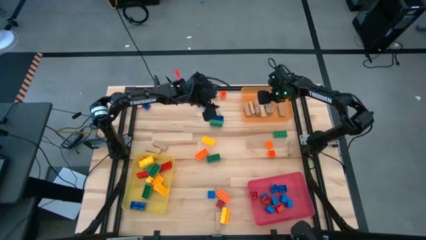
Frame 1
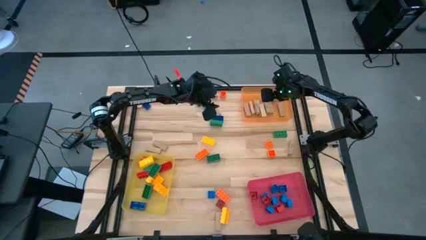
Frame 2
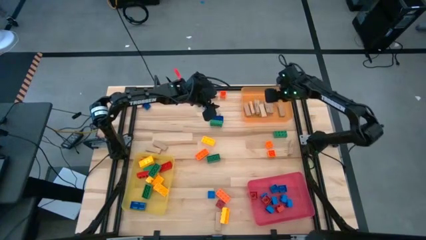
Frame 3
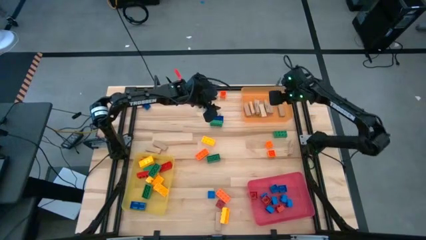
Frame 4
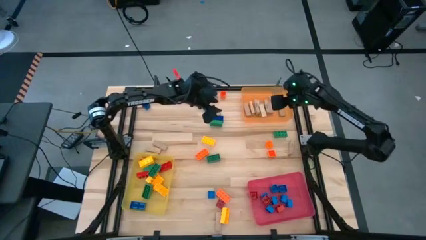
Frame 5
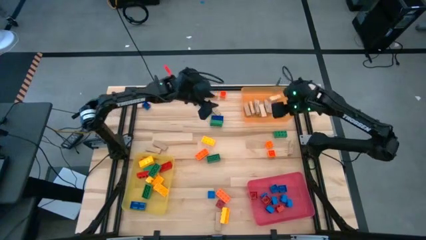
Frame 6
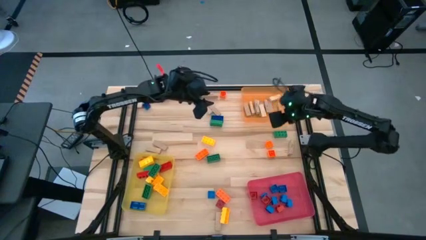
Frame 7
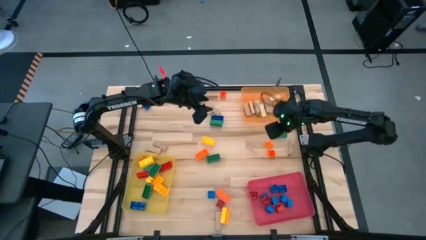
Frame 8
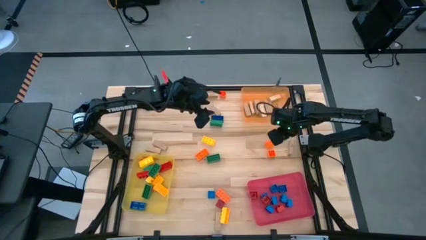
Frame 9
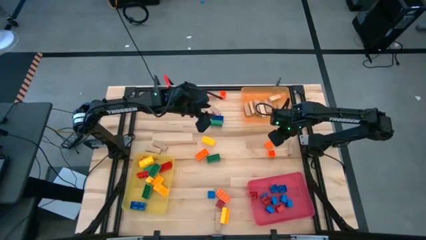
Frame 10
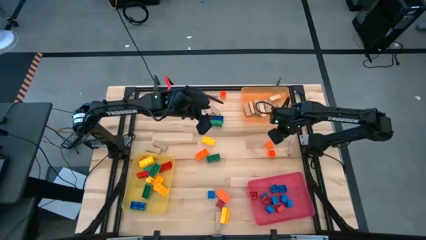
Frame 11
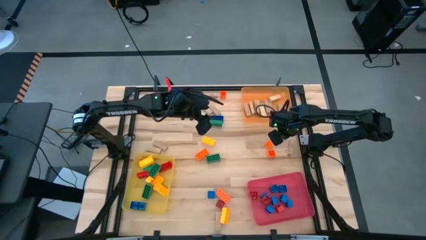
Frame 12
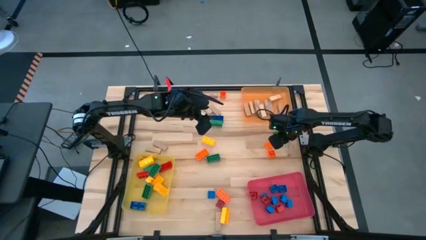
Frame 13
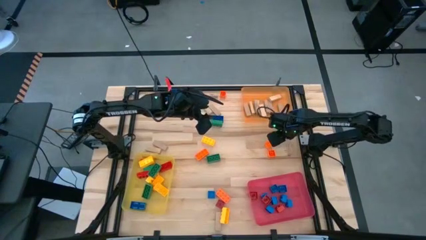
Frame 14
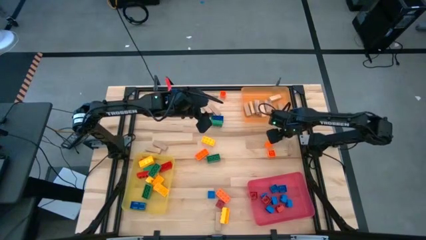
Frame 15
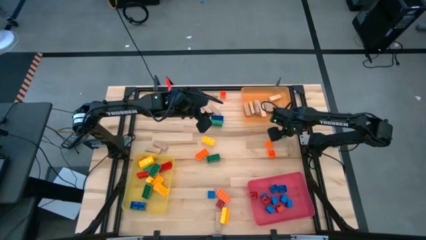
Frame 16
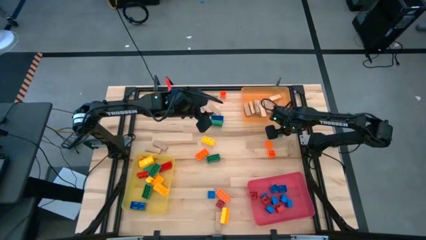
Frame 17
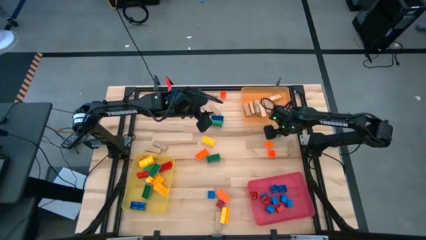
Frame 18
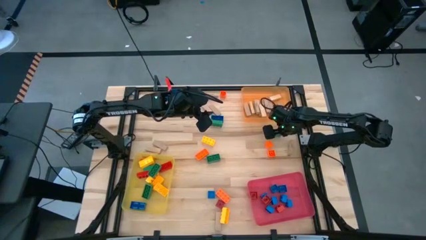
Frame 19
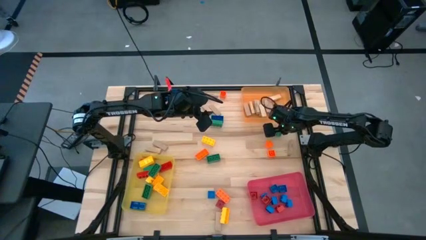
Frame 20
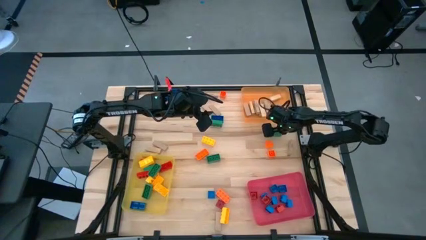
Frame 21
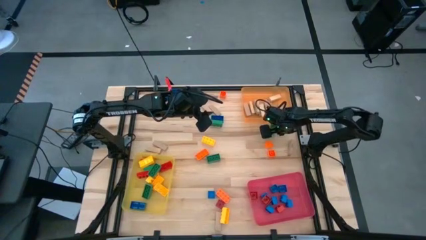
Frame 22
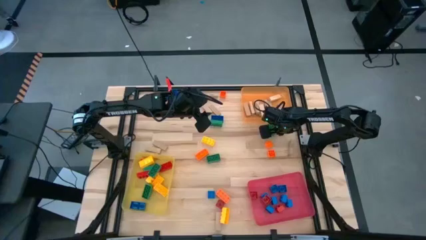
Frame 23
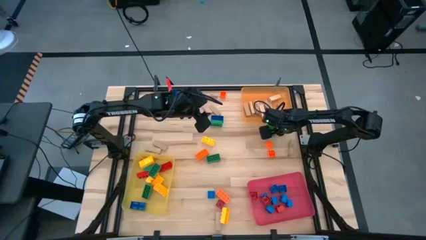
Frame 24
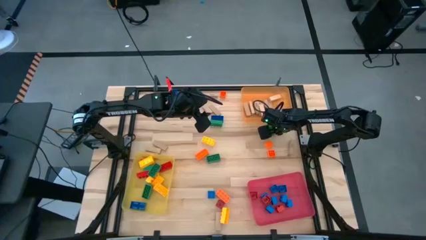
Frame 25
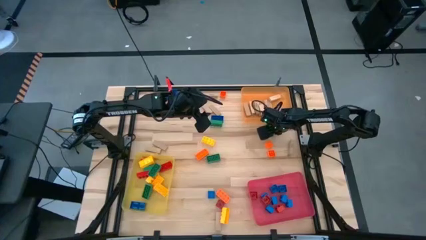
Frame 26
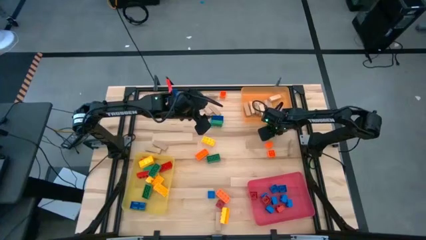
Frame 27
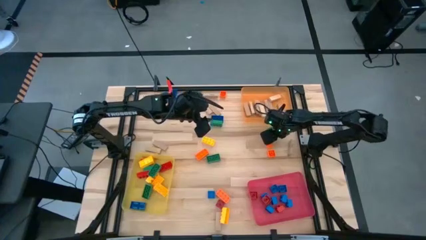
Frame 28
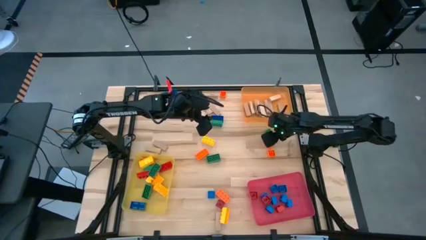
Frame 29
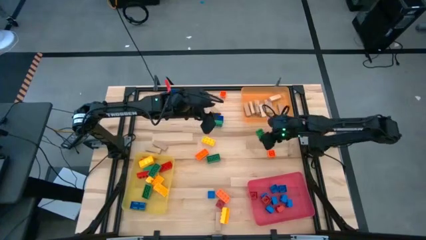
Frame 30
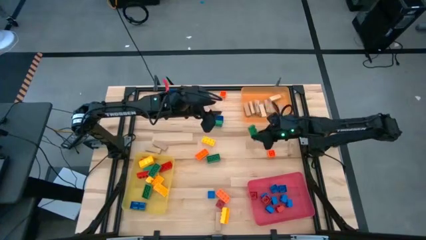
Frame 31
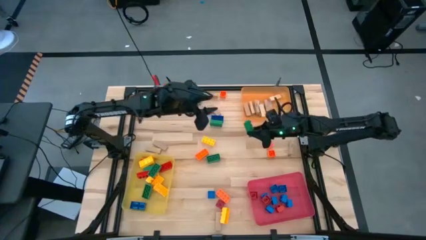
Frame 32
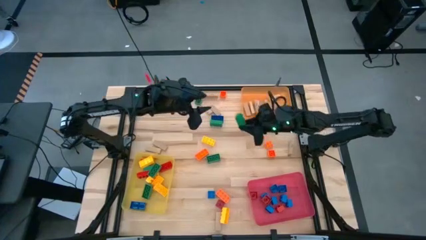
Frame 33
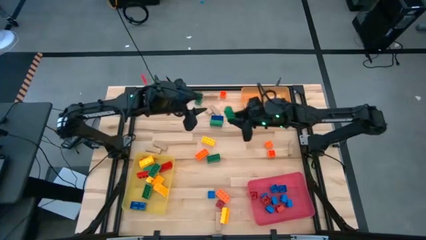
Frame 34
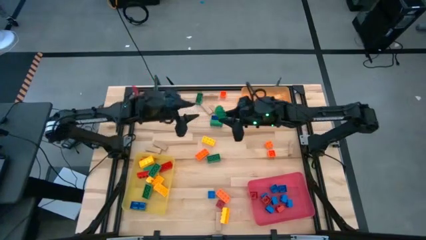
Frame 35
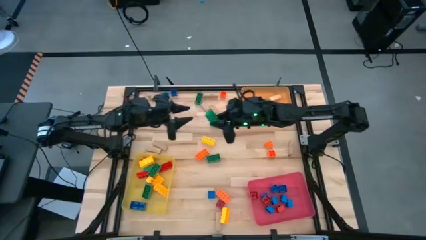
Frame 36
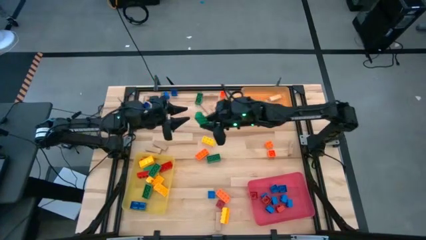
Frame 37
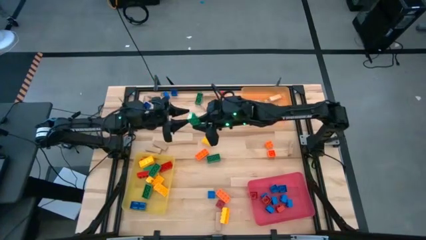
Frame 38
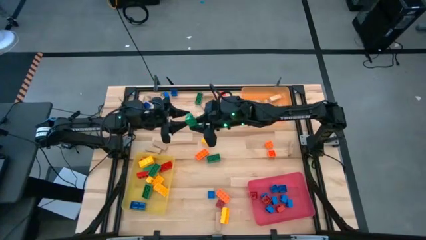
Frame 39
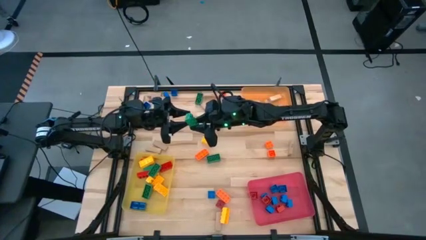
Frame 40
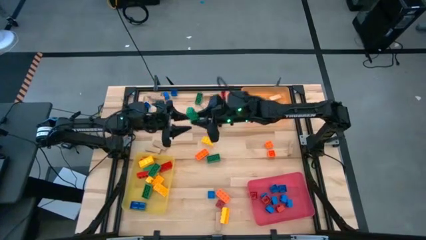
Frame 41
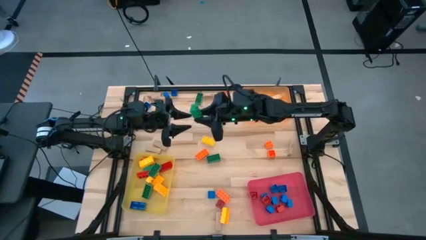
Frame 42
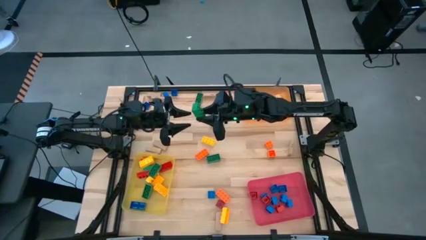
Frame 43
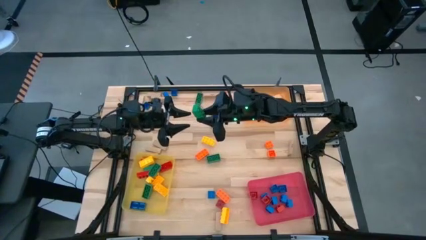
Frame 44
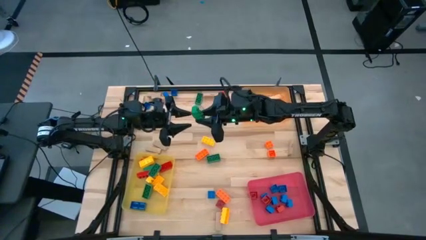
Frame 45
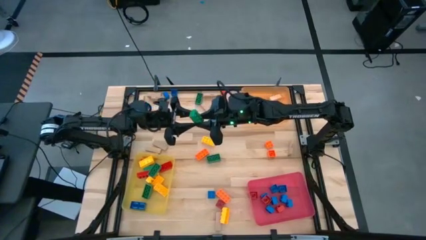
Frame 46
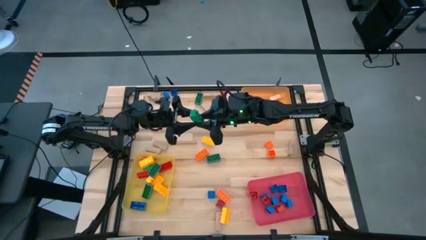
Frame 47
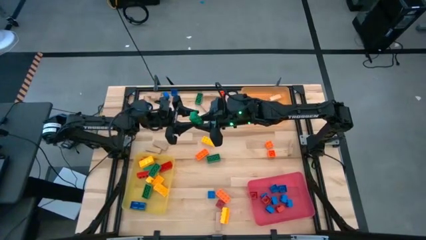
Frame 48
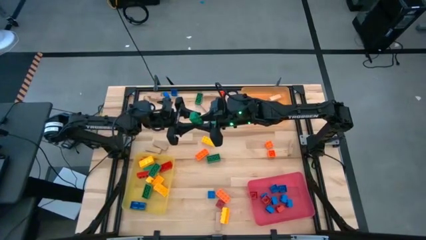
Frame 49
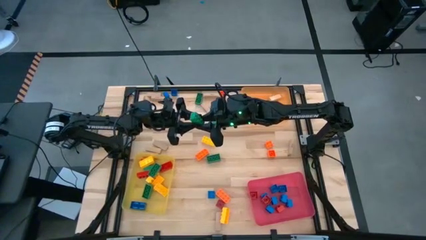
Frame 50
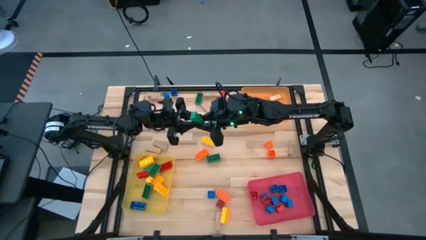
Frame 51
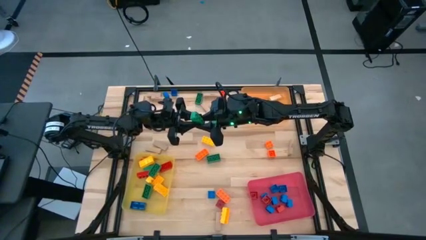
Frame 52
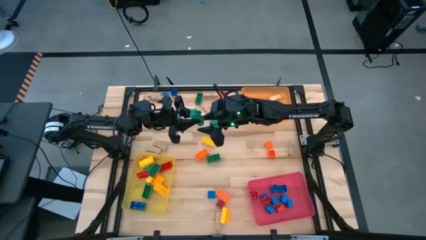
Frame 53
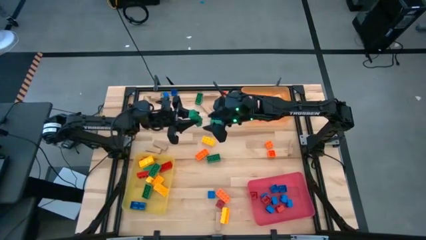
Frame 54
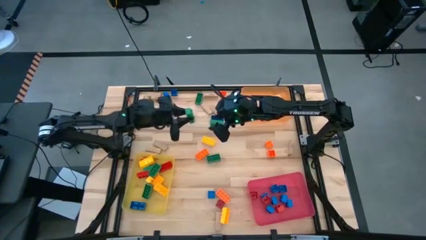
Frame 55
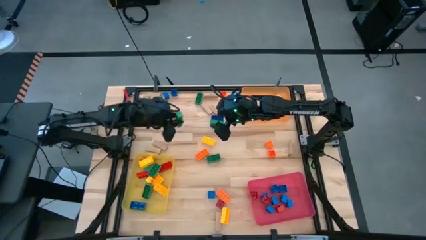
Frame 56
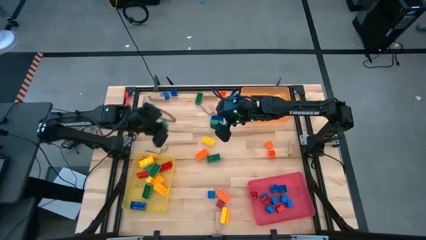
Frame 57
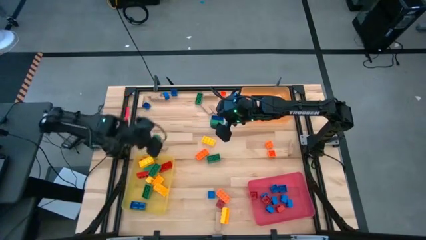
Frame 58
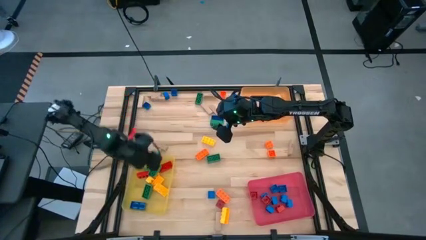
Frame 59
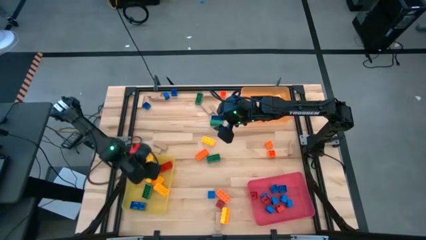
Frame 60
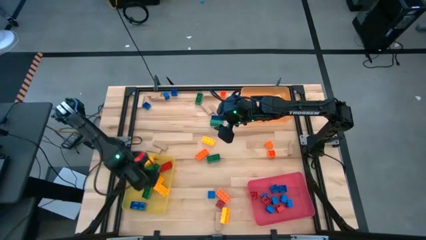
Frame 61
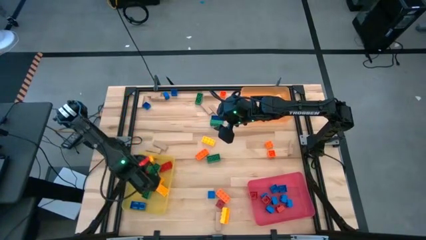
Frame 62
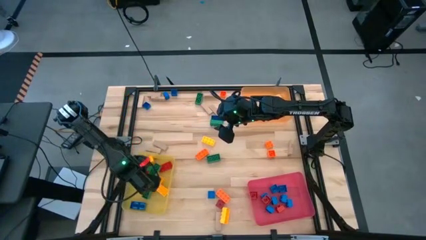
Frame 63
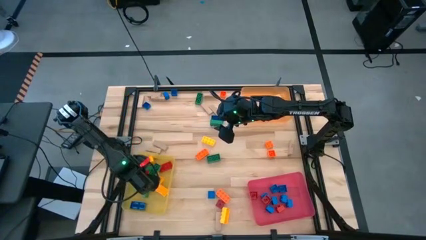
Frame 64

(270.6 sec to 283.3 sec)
Task: Sort blocks by size
Put the large green game piece into the yellow bin

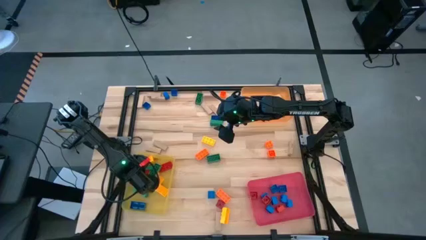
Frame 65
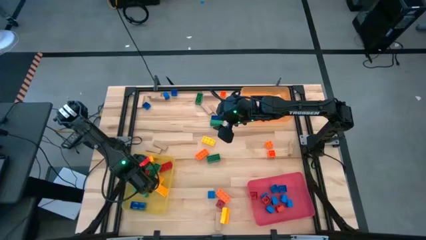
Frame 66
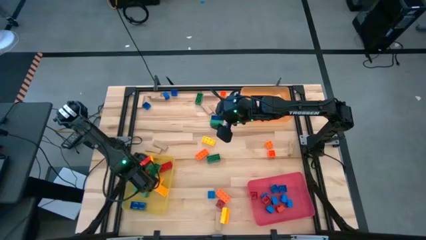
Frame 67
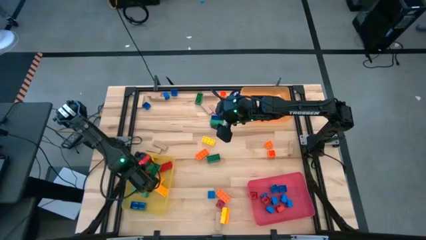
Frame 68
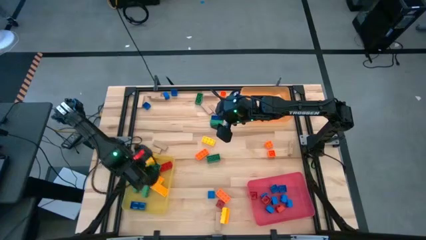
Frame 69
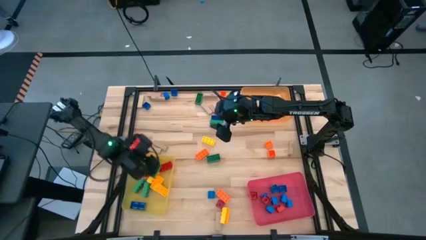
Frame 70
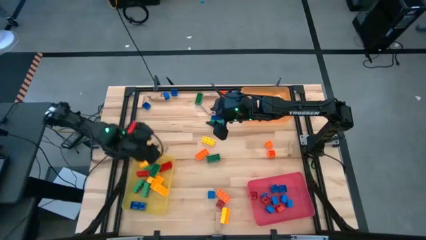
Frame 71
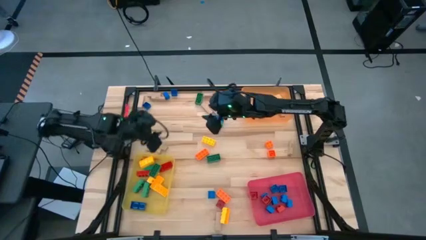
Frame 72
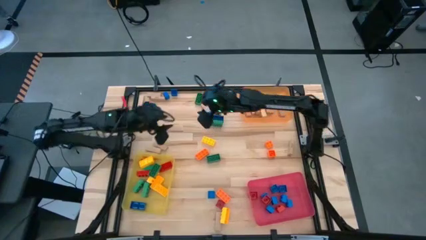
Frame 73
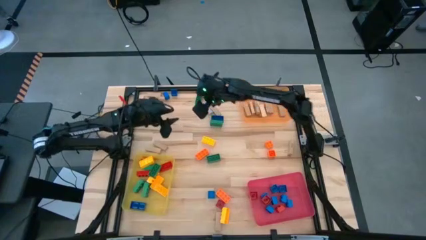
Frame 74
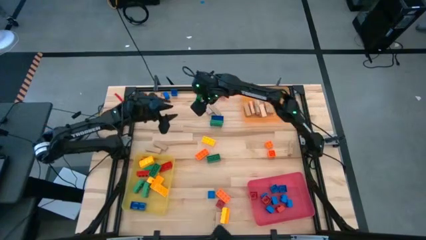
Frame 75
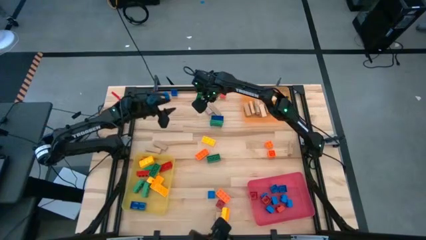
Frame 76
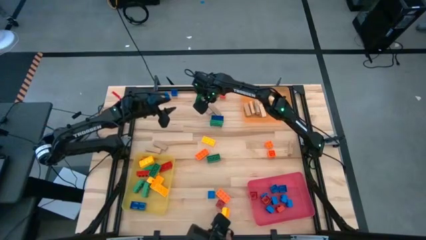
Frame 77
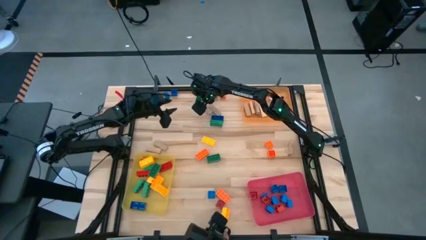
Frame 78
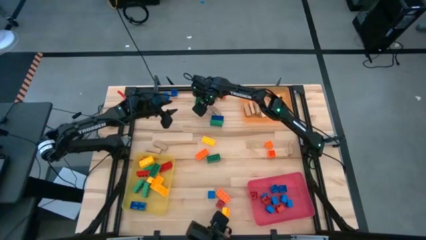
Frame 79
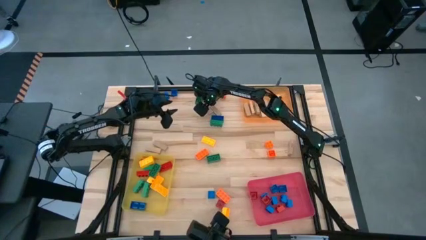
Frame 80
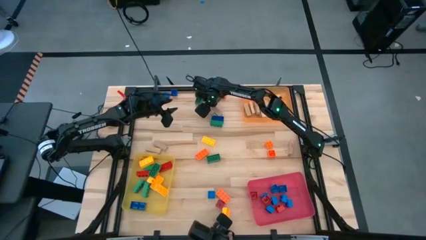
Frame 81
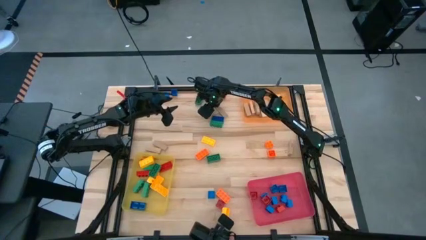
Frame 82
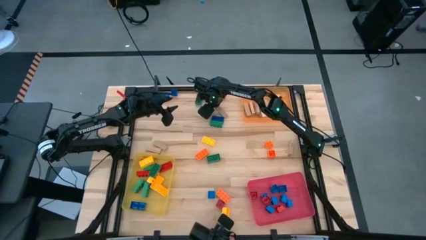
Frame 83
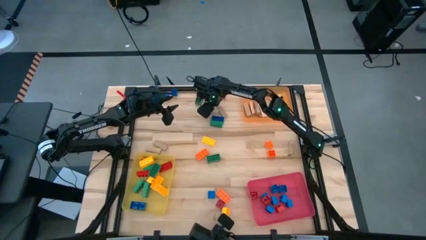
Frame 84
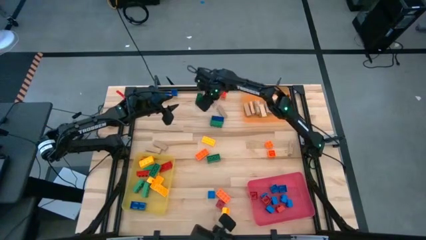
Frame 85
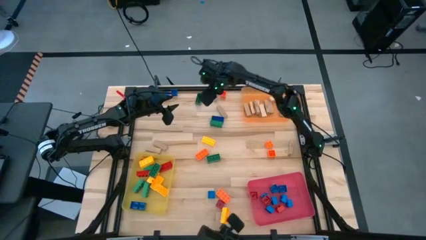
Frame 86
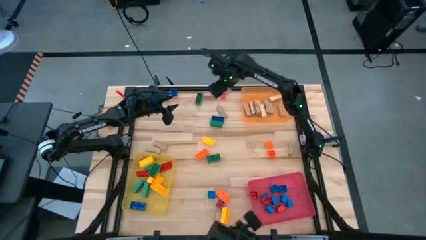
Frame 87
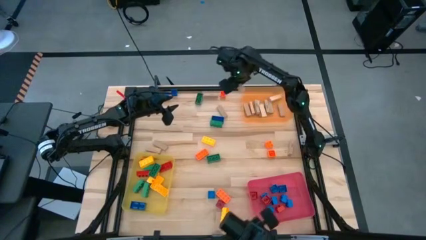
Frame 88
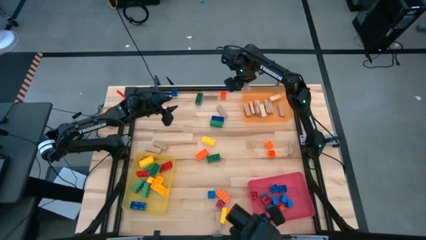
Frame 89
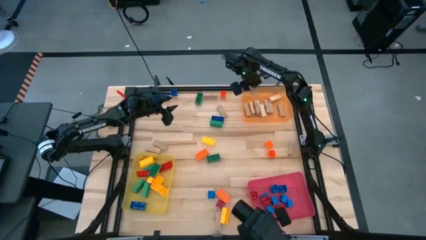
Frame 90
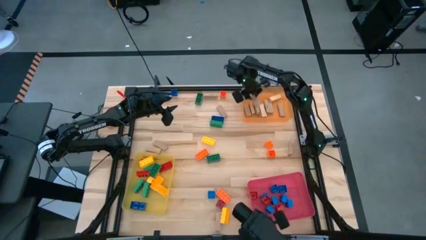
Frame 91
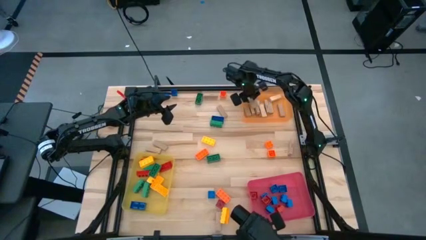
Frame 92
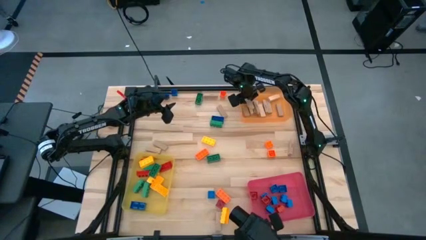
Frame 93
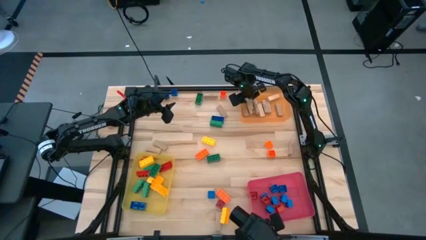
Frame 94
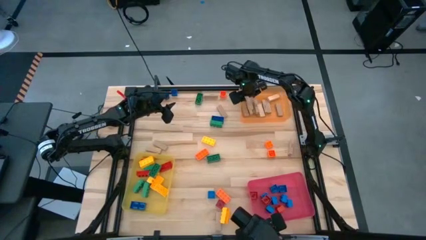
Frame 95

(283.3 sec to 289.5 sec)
Put the brown block into the orange bin
